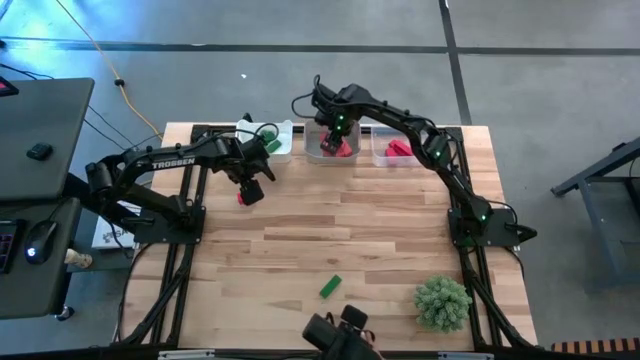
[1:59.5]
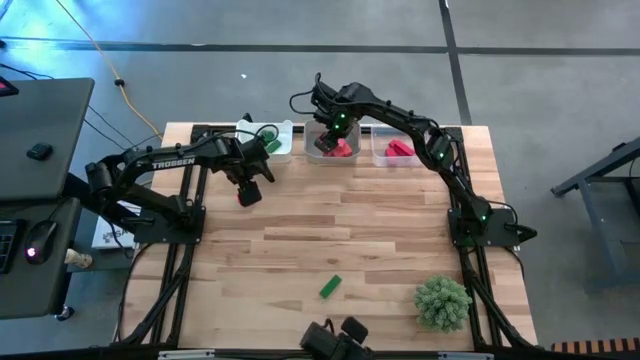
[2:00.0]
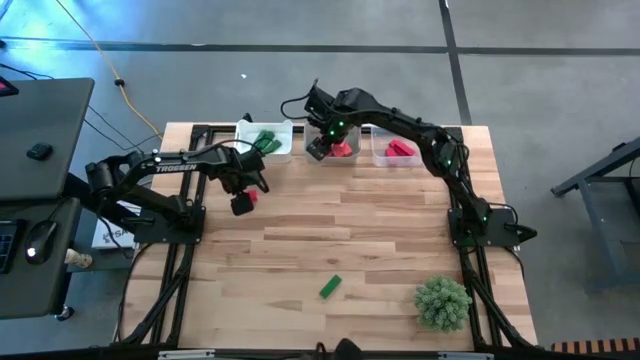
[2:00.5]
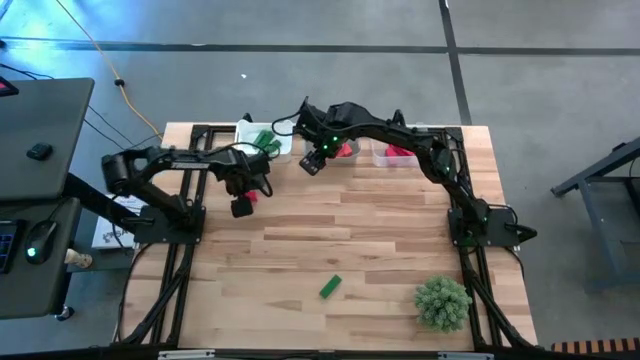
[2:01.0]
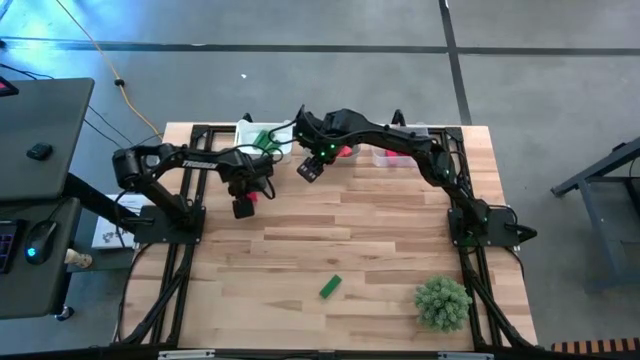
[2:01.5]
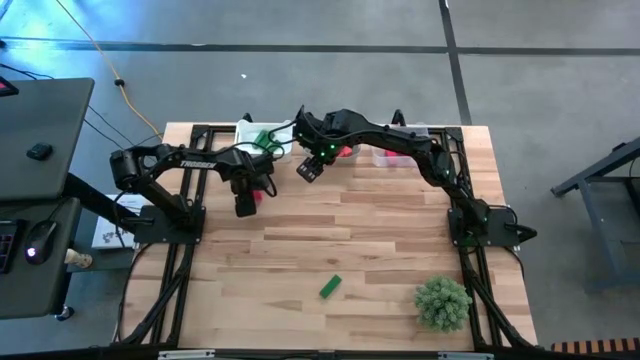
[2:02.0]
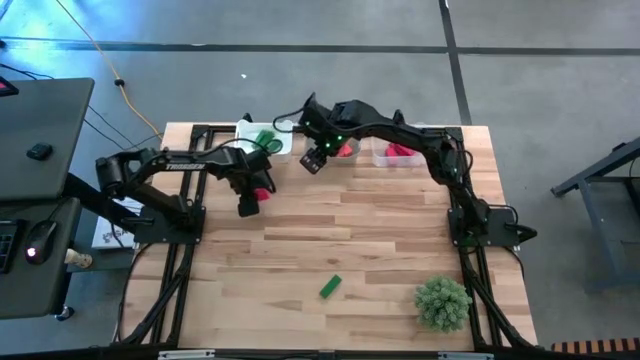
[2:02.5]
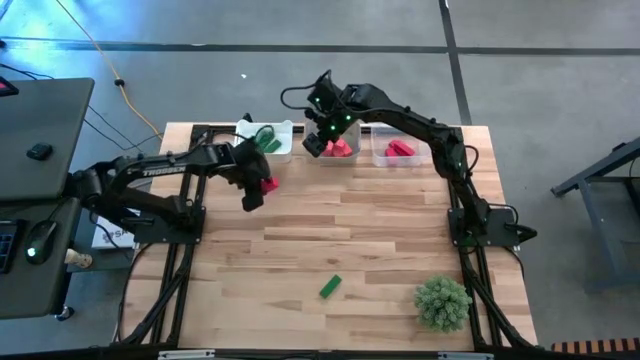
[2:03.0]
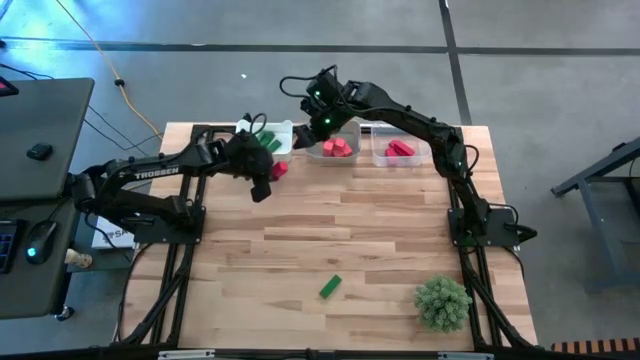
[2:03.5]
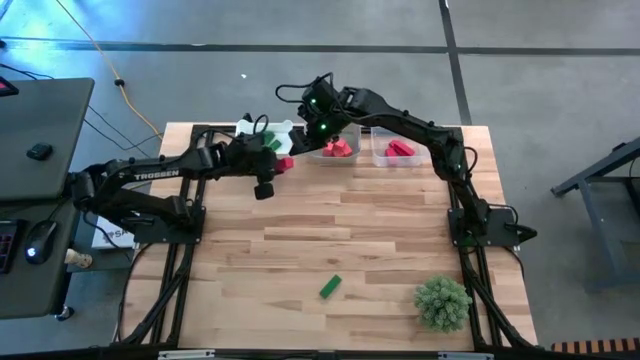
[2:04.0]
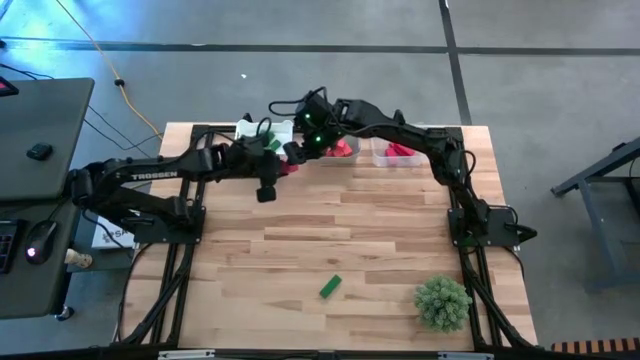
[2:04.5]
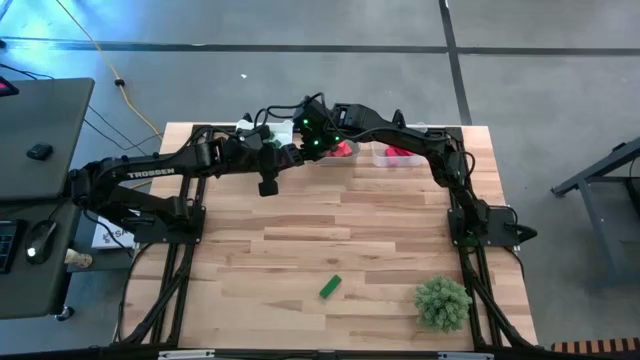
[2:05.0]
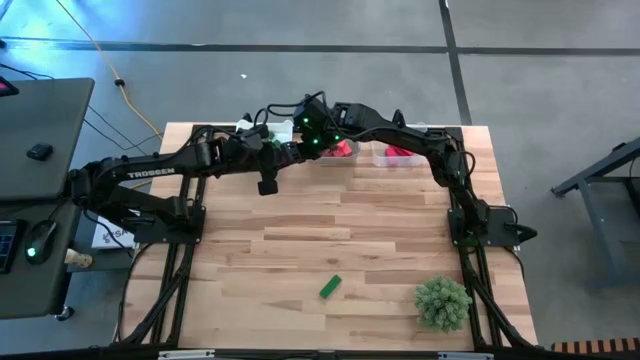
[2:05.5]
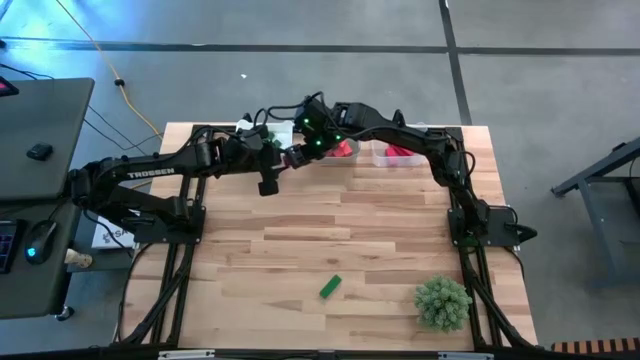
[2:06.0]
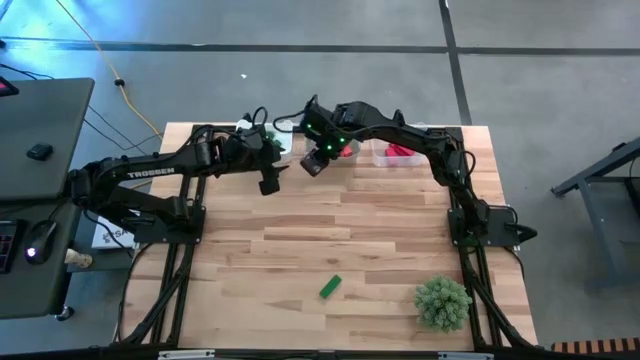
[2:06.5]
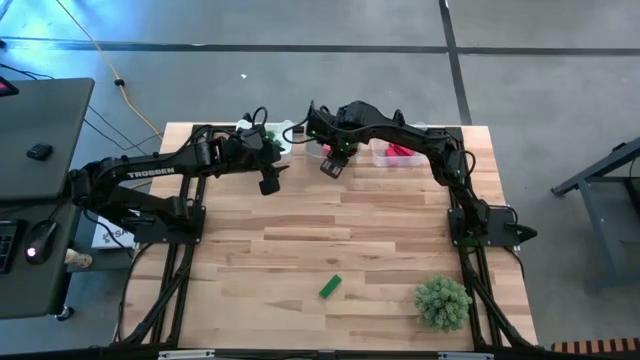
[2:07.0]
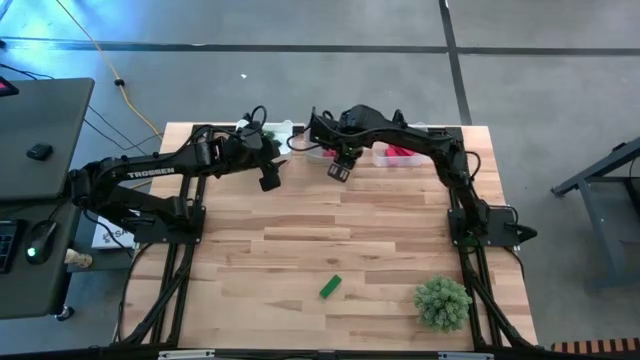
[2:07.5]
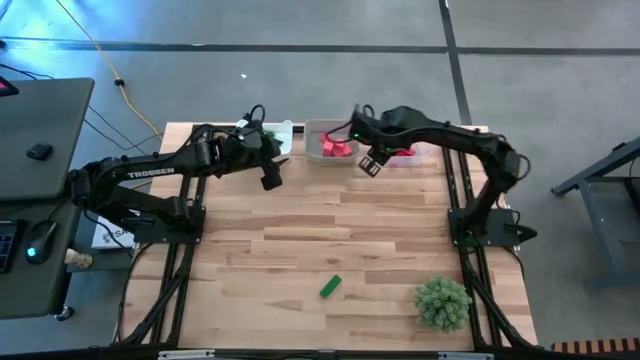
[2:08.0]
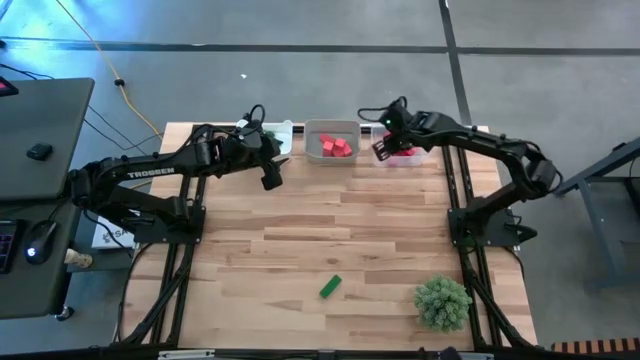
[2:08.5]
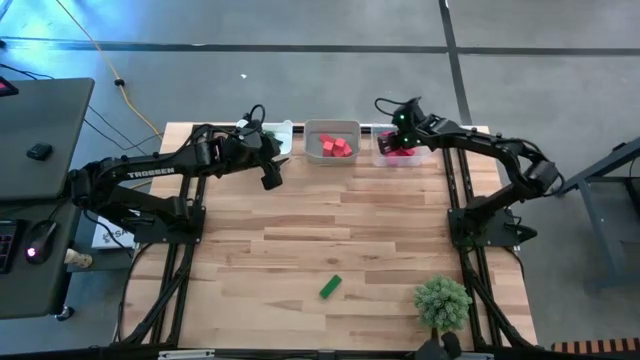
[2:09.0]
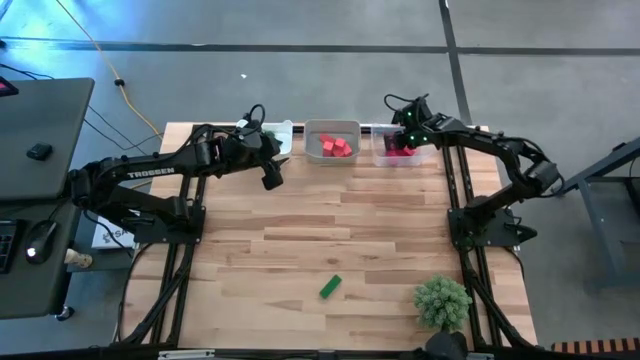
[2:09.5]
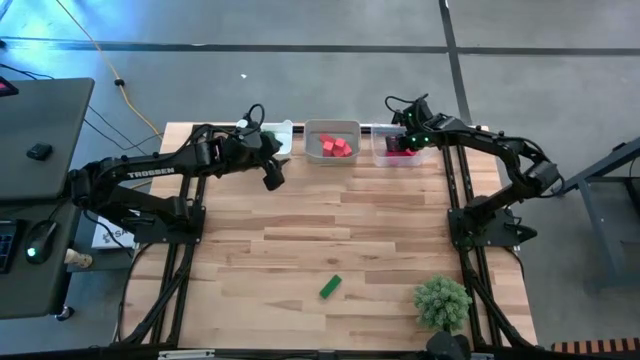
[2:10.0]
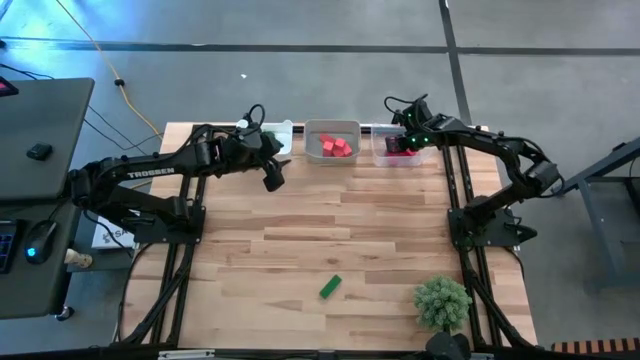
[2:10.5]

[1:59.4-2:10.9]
Task: Sort & place blocks by color
Put the red wooden block into the transparent bin

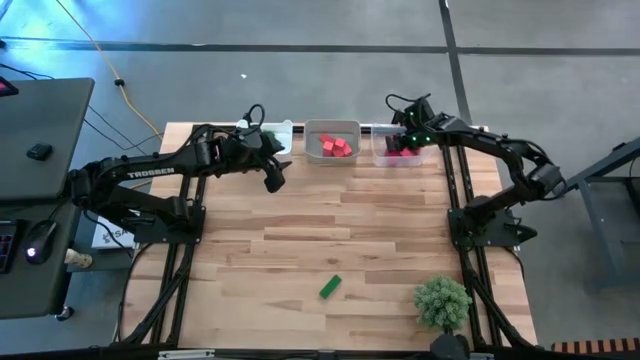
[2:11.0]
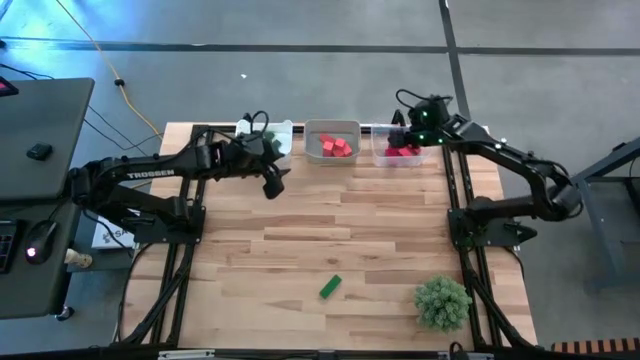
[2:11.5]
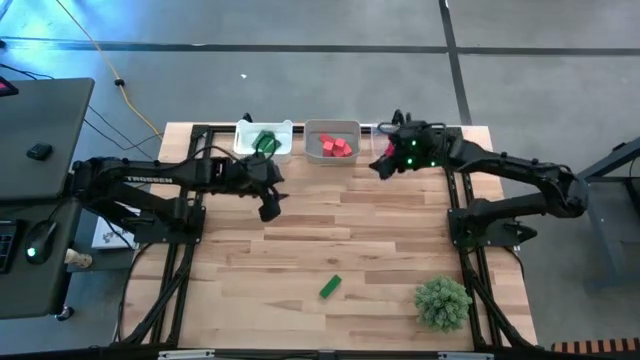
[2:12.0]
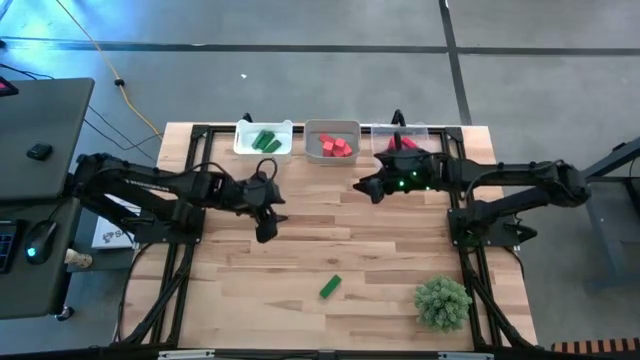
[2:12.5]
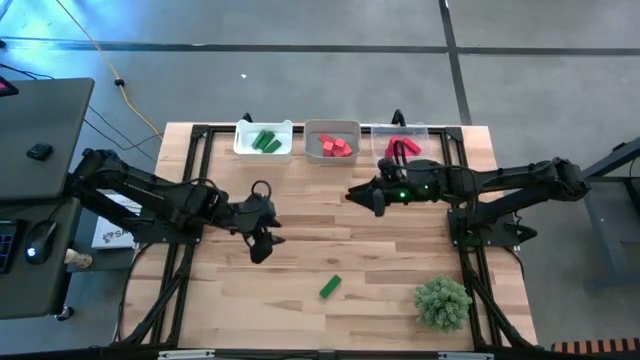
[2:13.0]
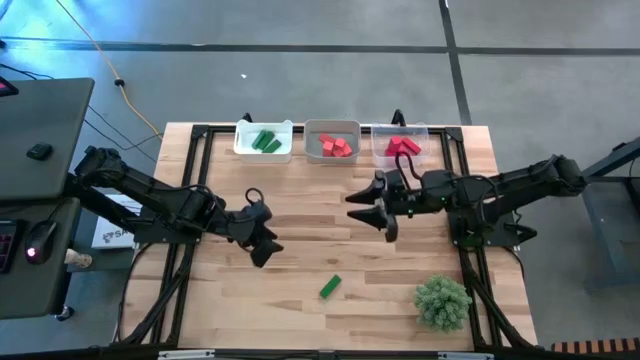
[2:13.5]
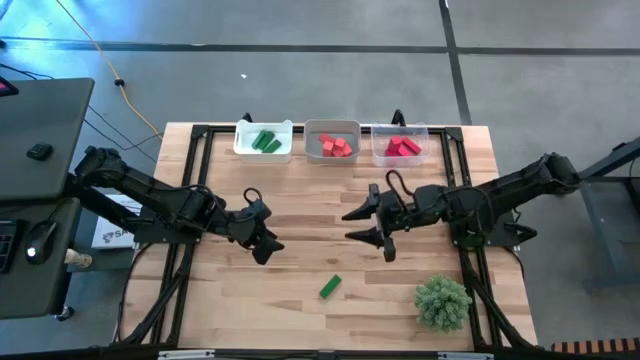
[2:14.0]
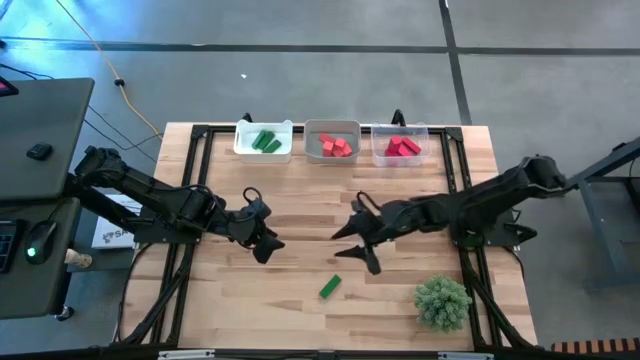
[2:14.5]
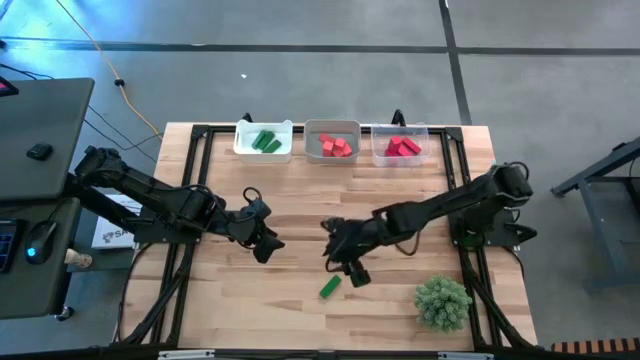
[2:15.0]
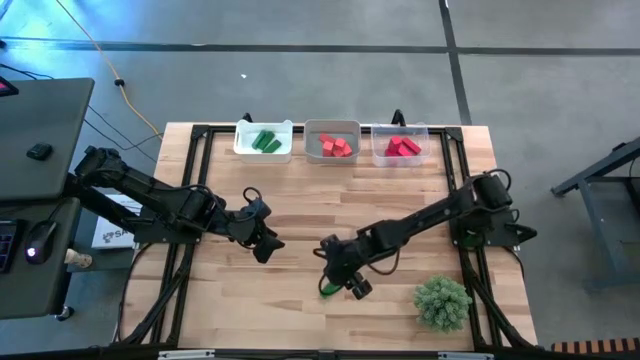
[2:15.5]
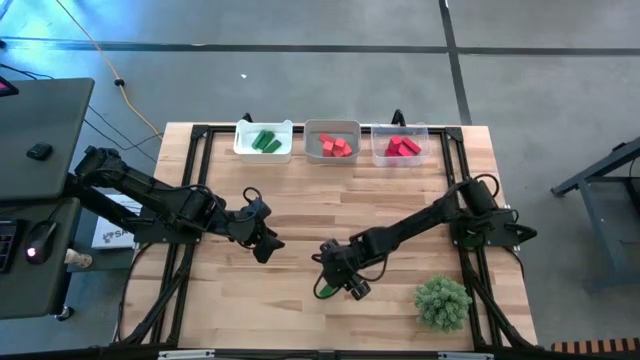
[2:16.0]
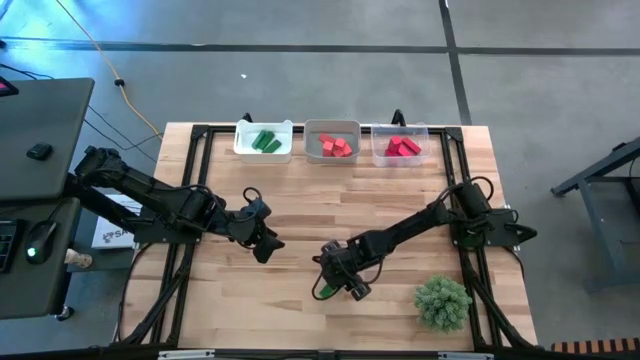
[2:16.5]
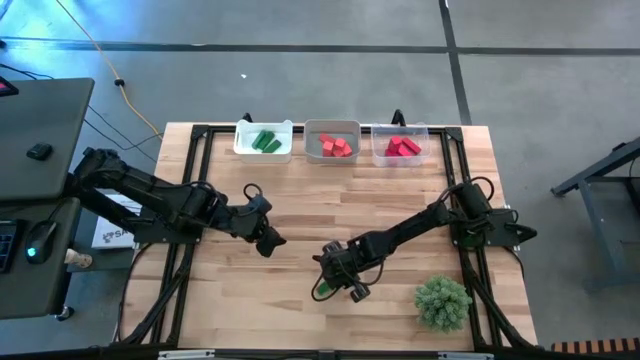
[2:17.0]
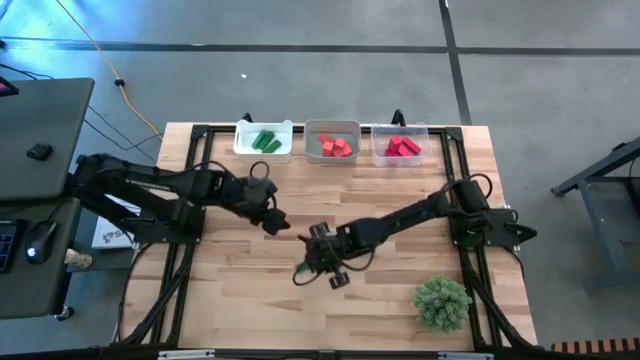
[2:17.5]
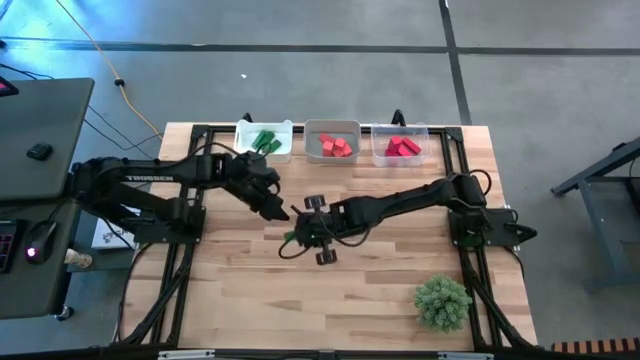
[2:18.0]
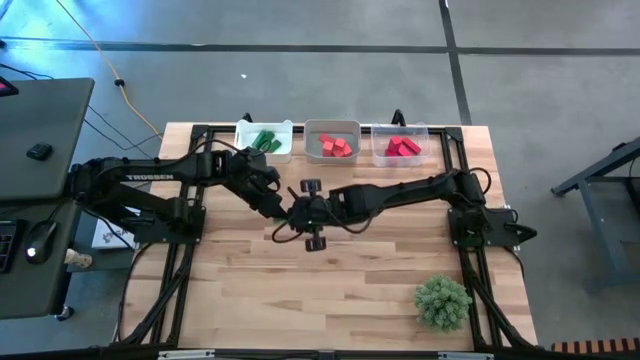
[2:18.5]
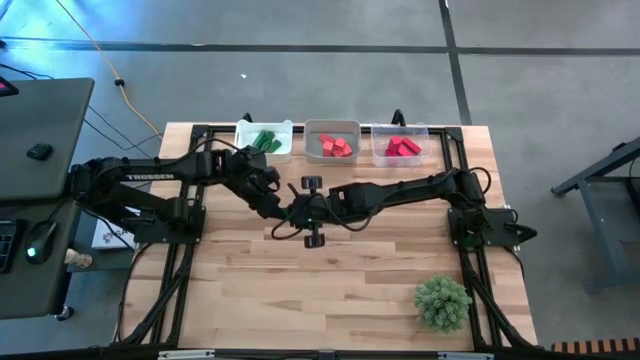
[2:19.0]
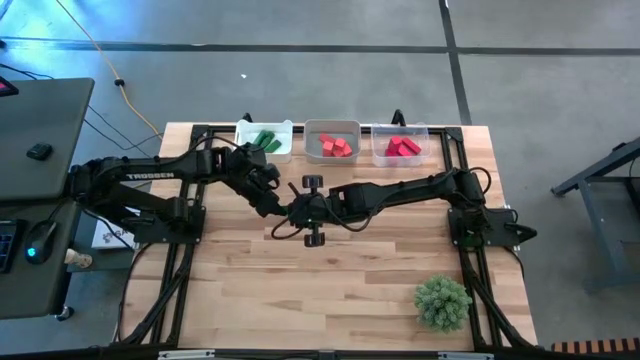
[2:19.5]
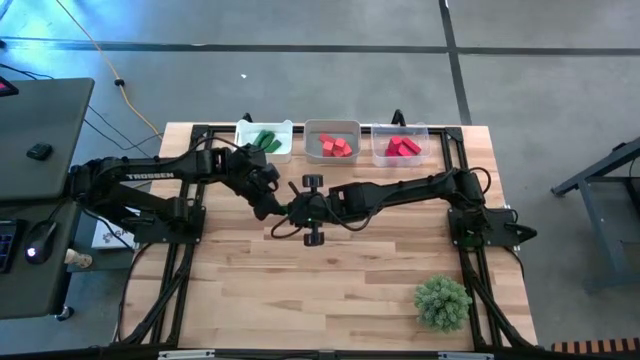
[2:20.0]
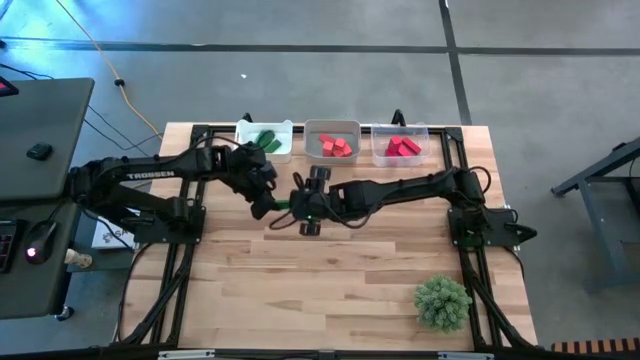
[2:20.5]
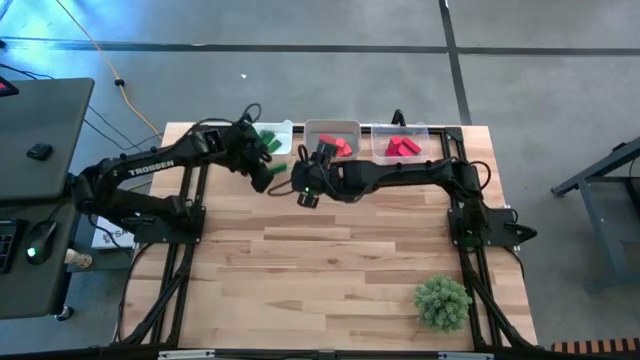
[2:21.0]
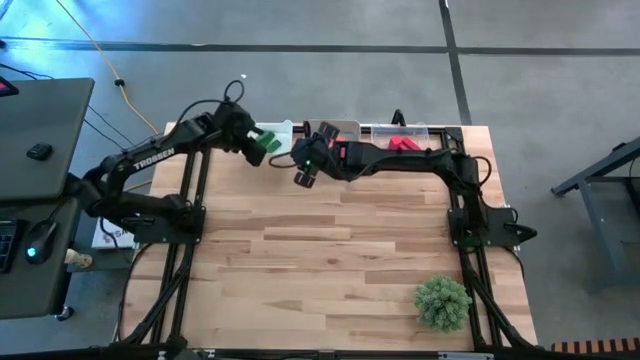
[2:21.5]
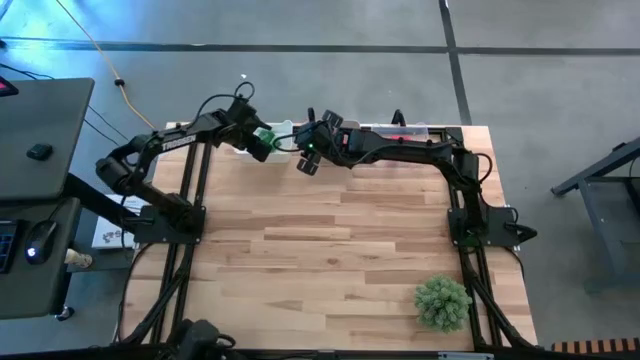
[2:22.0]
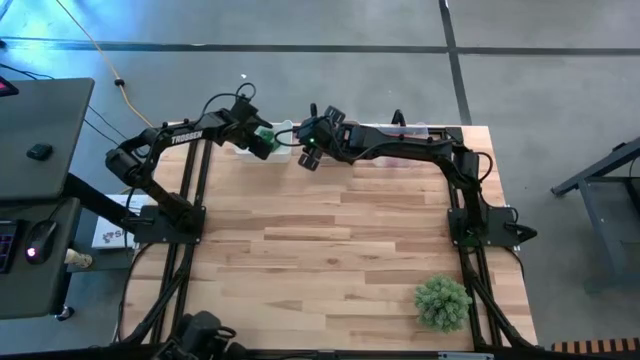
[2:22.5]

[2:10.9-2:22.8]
Put the green wooden block into the white bin
